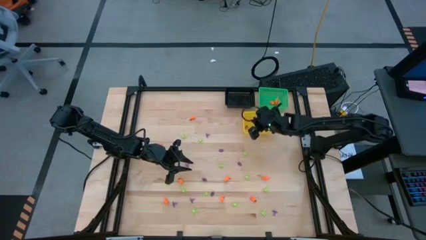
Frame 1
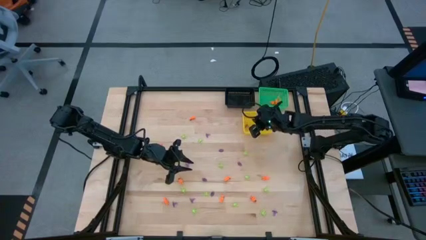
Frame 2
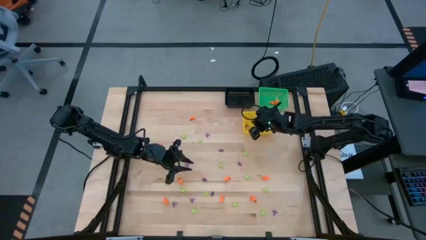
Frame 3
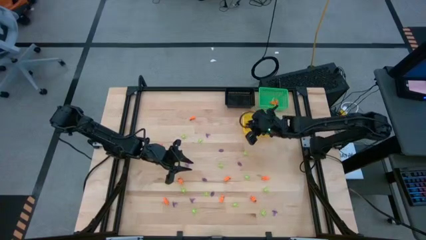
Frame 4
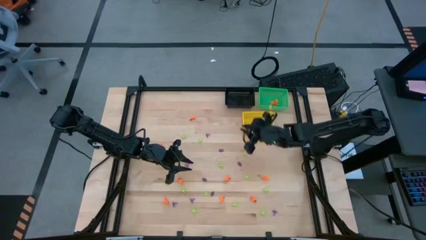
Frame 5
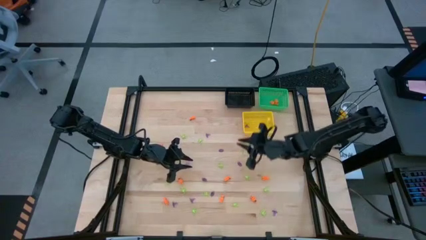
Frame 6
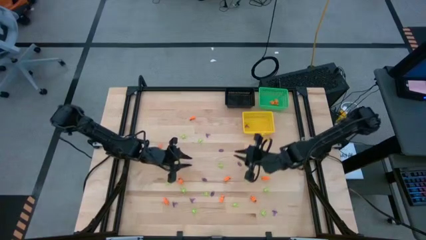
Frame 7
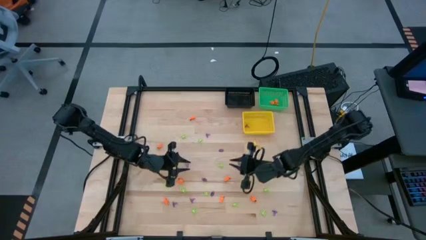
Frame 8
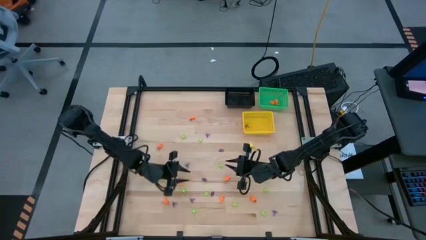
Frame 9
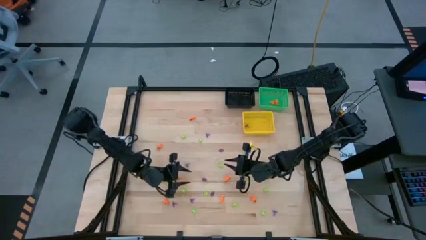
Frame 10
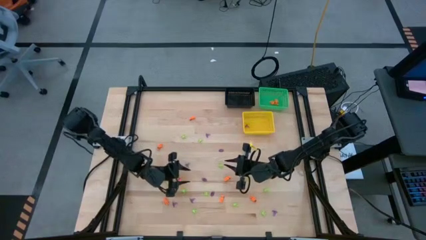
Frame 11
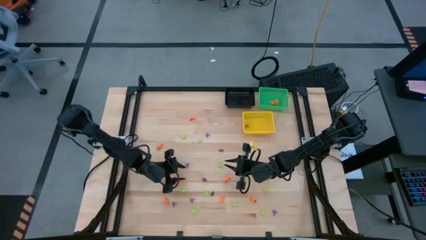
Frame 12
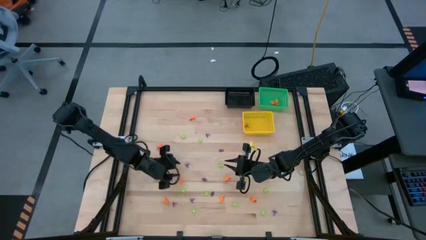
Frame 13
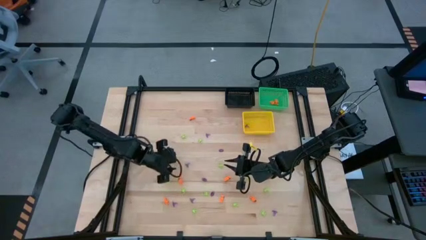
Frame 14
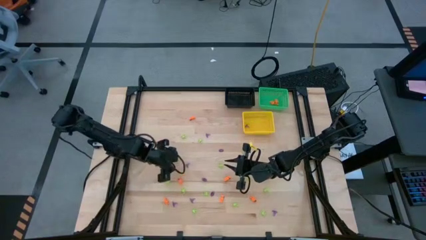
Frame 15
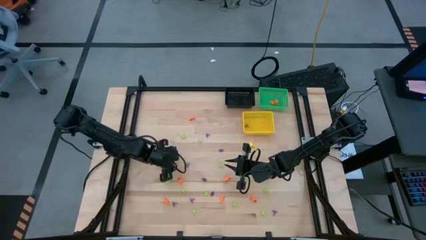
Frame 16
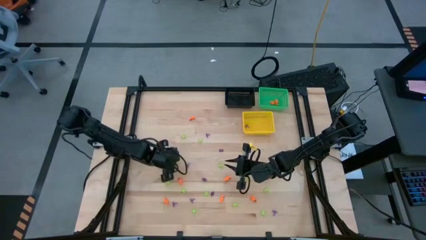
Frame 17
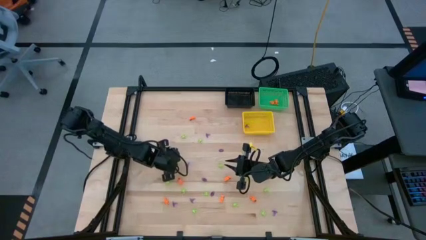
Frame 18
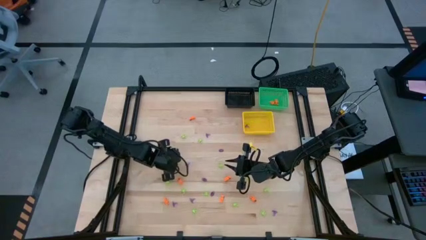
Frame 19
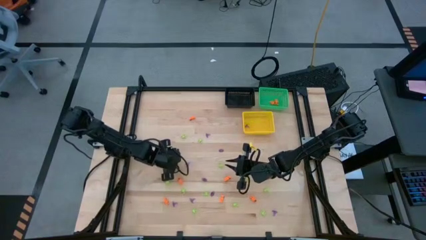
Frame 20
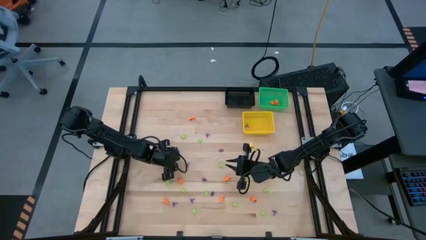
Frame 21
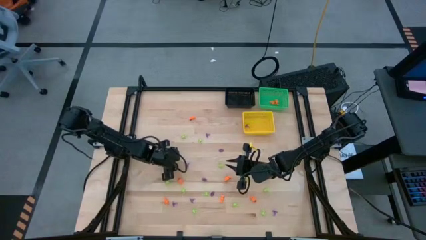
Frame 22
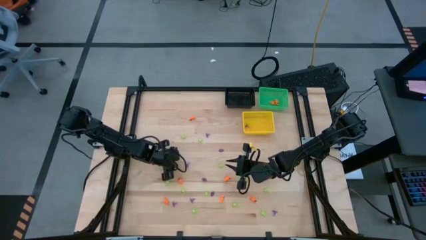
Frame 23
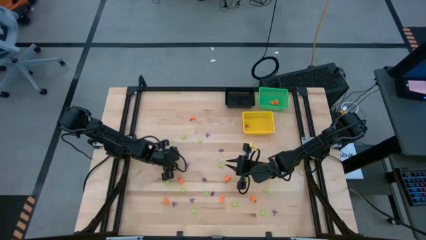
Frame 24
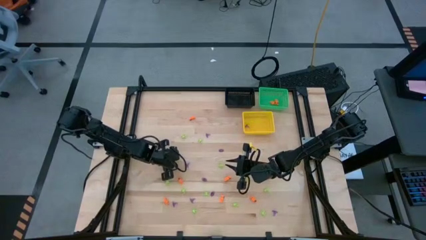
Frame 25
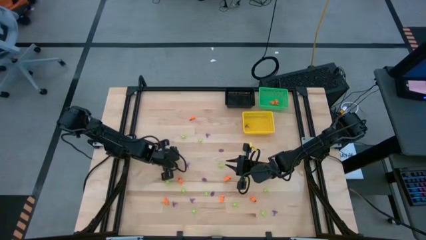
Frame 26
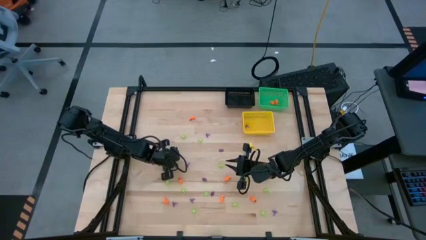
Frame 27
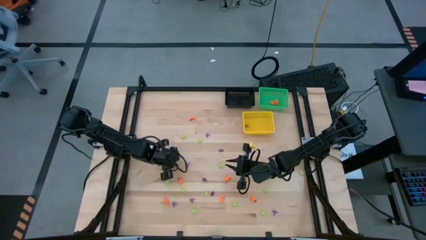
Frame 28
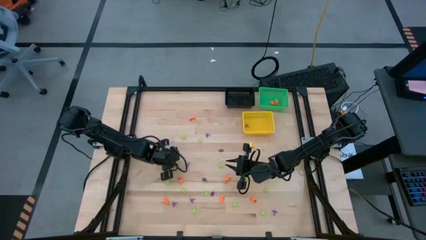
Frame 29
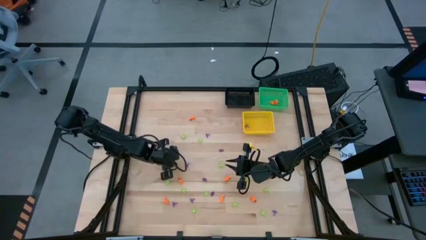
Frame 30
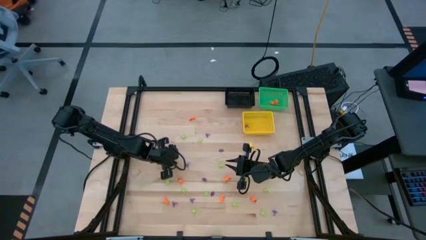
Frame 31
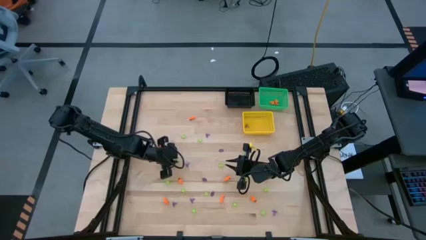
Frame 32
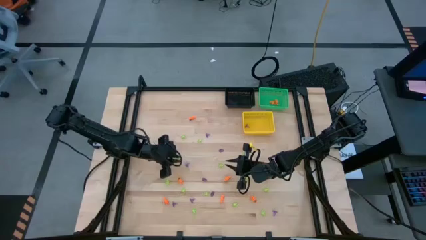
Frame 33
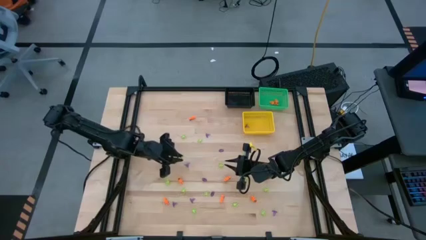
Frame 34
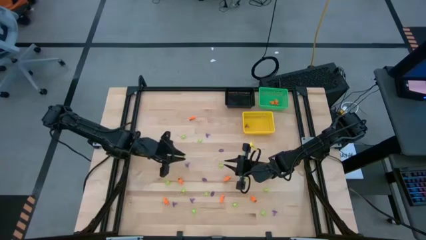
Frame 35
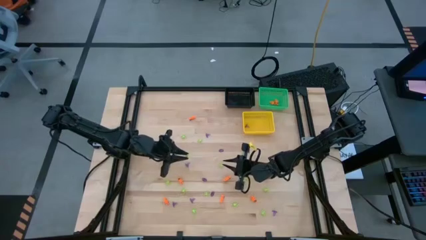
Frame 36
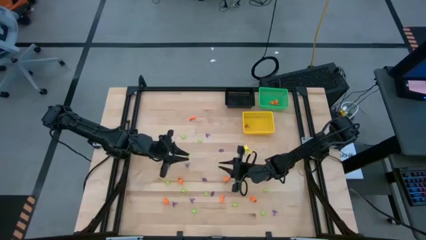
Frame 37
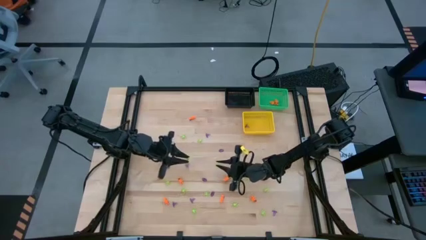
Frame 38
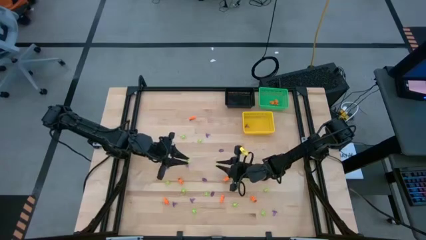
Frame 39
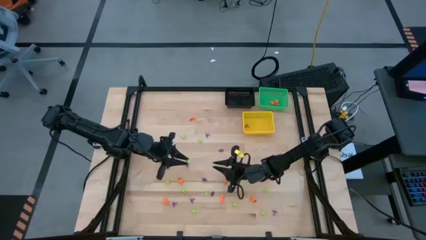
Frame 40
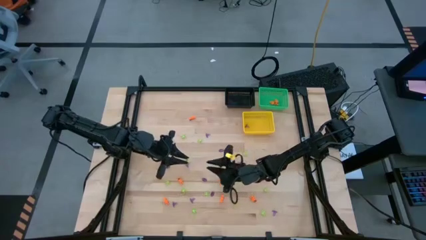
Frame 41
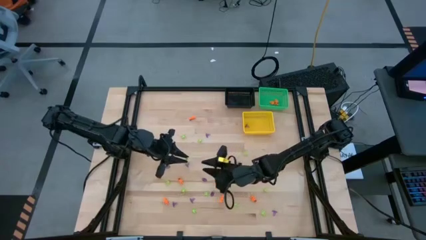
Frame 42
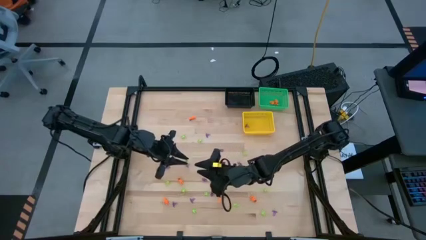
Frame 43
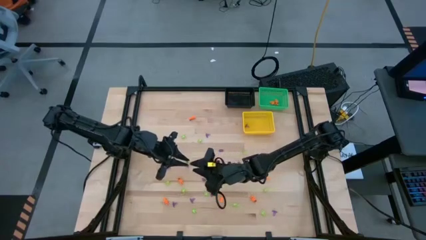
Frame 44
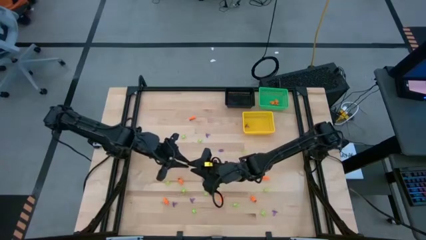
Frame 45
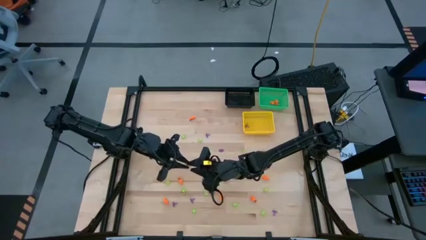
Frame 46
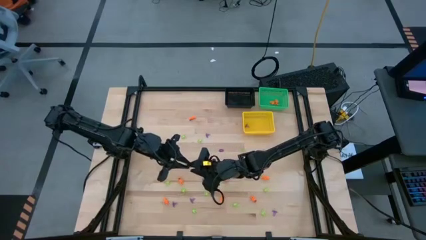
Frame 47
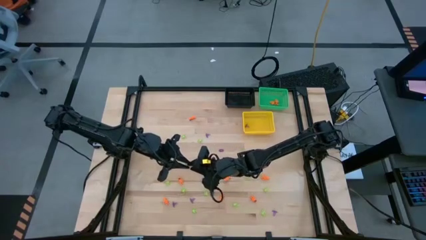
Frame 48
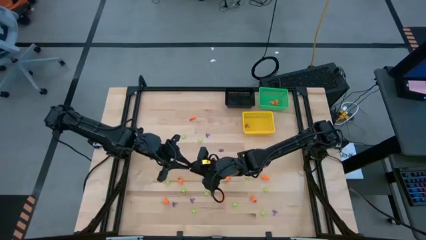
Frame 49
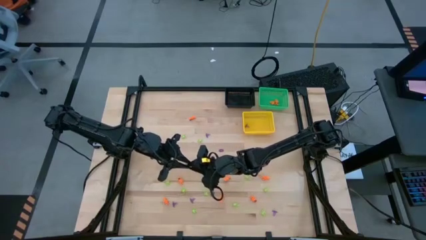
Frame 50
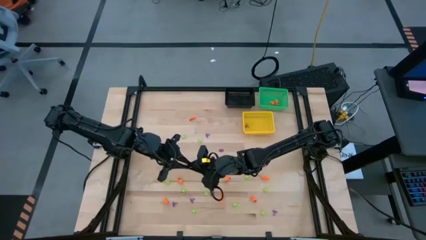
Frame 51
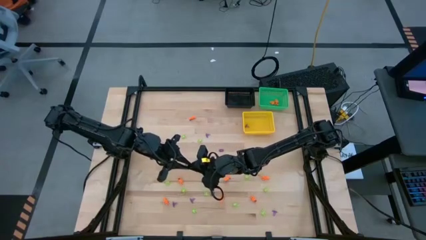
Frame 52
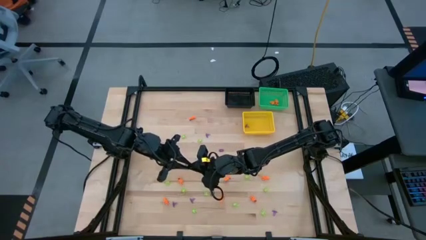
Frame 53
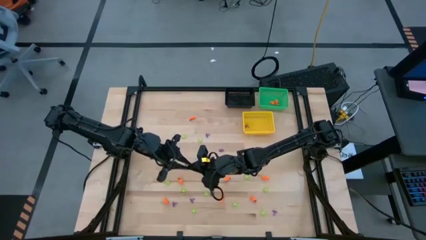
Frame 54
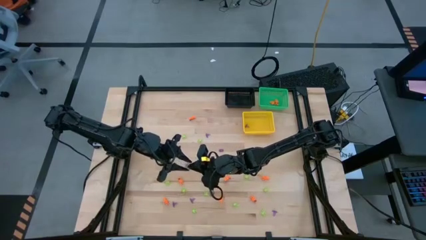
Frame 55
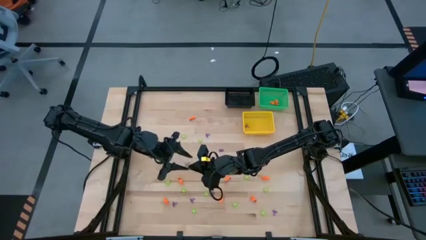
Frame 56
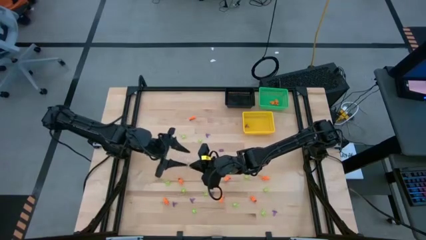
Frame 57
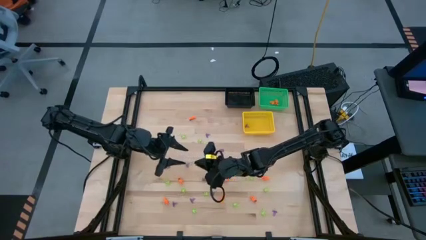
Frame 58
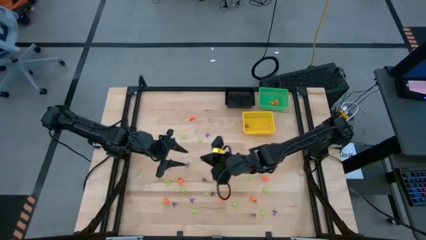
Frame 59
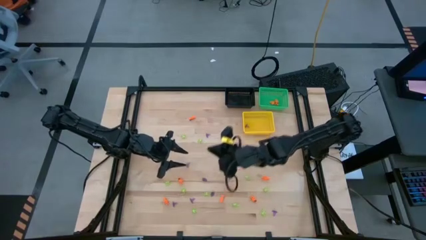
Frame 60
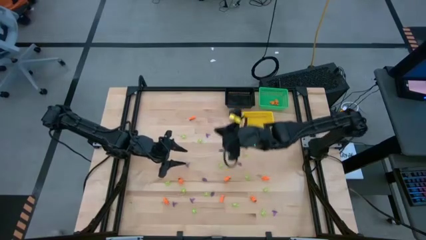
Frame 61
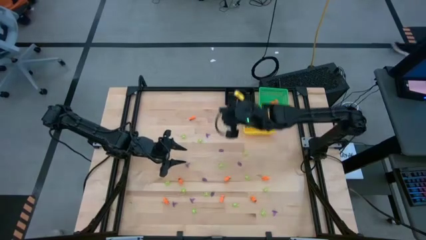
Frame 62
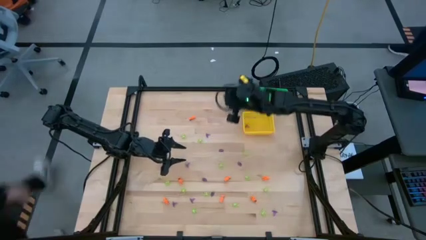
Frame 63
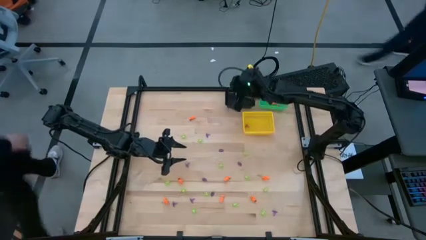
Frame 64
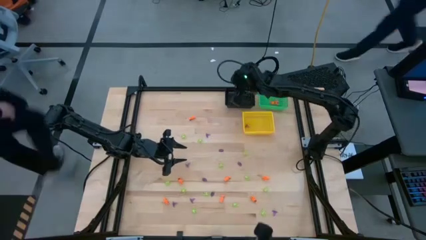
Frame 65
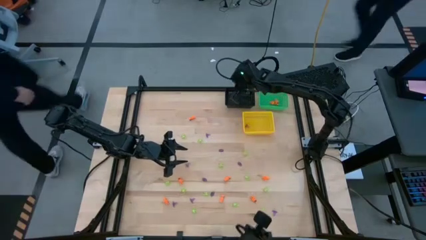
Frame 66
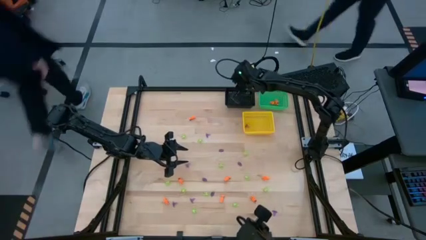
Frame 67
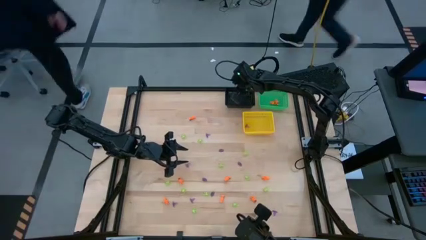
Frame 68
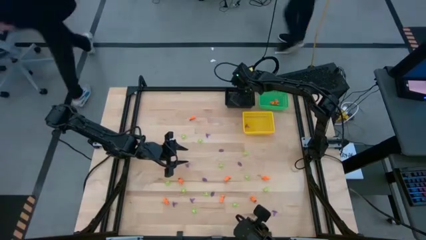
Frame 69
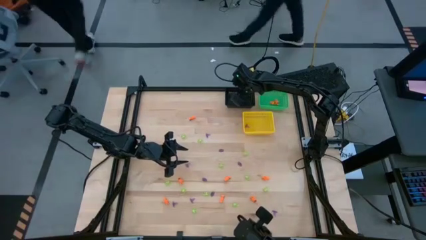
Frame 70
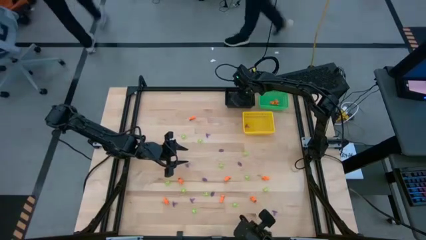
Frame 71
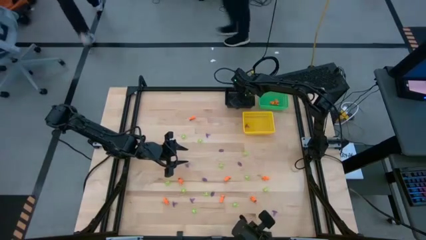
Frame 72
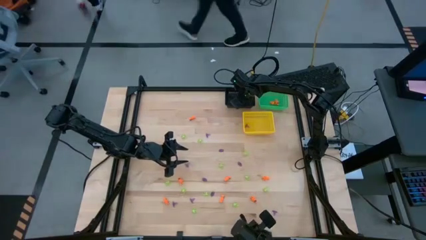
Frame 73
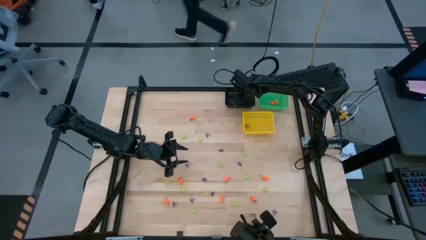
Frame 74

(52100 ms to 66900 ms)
Task: Sort Halloween decoration
Put the green spider toy into the black basket

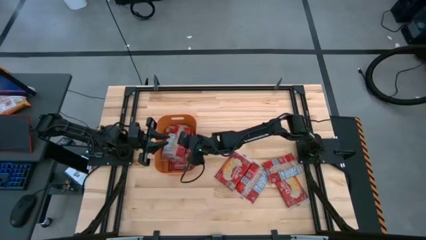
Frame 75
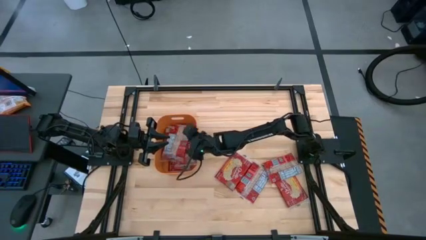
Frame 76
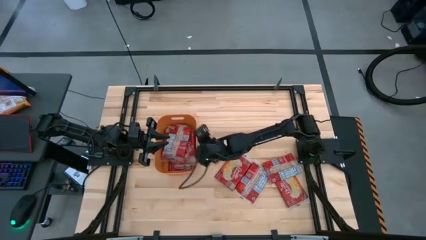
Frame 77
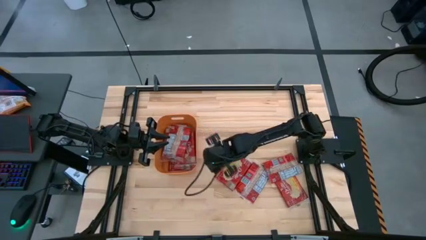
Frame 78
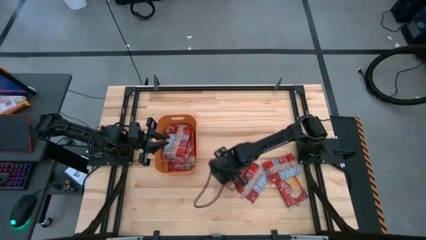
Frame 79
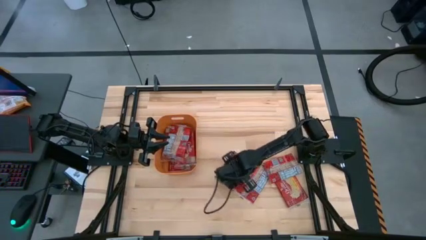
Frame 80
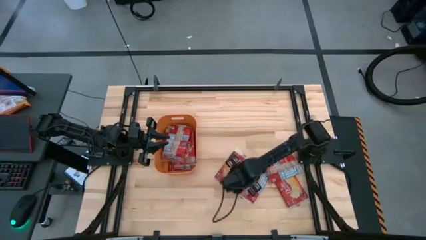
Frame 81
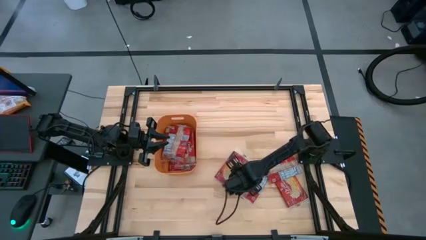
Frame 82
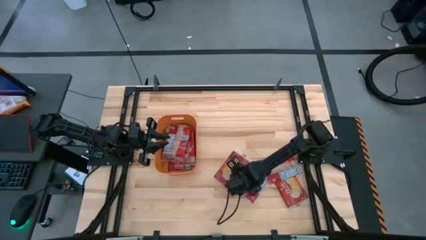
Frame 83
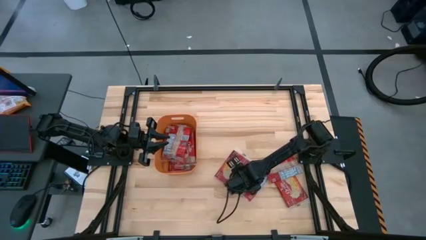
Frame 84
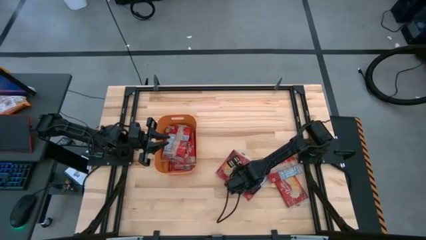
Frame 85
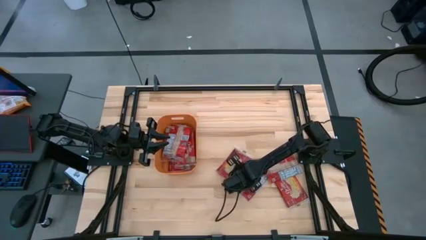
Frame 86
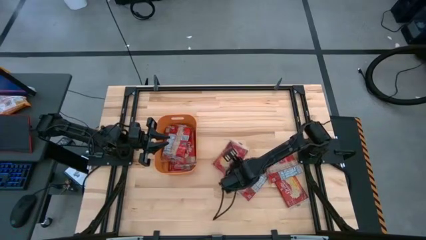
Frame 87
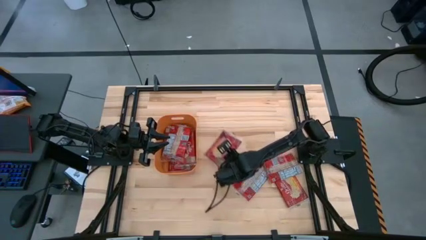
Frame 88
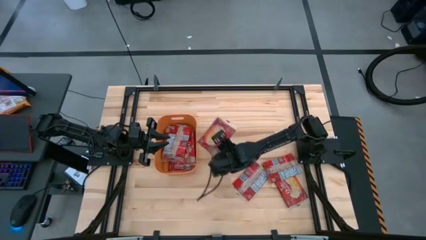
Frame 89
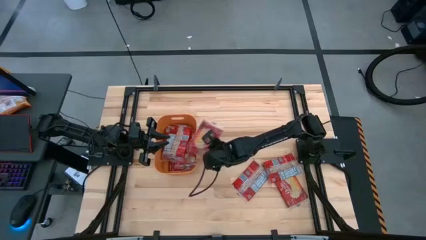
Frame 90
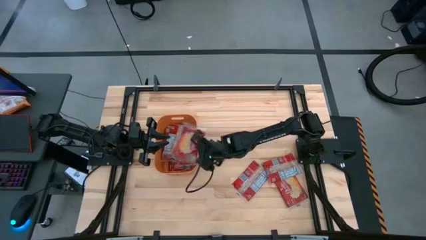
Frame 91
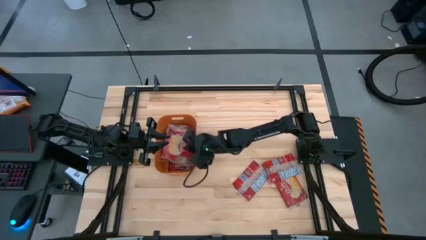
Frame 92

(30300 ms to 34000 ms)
Task: Sort popcorn bags into baskets
Put the popcorn bag into the orange bin
